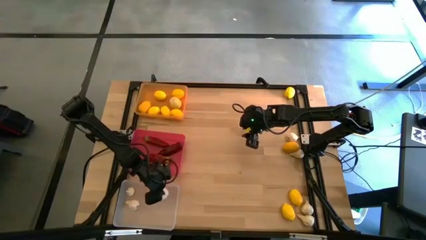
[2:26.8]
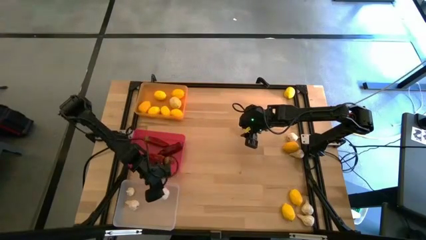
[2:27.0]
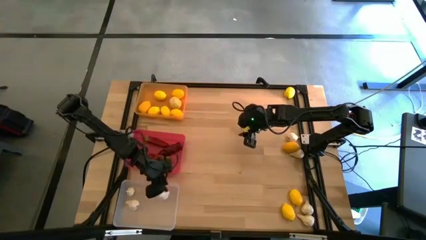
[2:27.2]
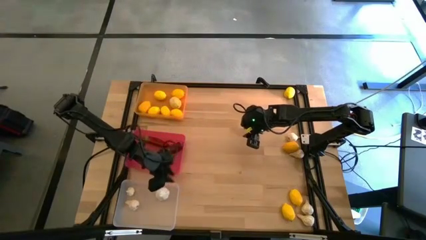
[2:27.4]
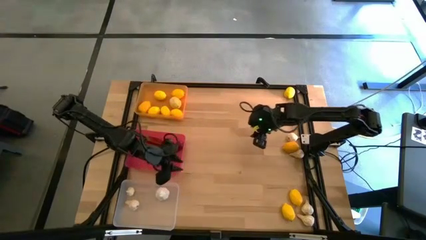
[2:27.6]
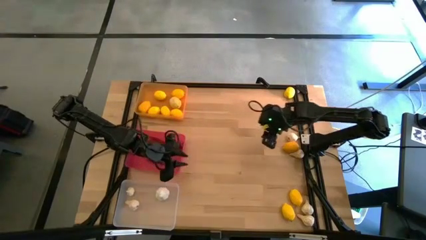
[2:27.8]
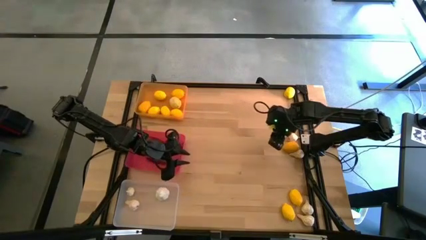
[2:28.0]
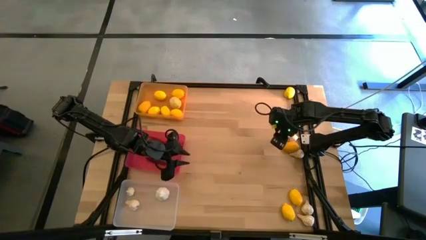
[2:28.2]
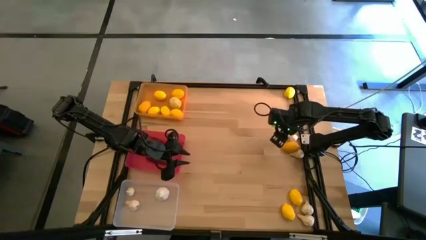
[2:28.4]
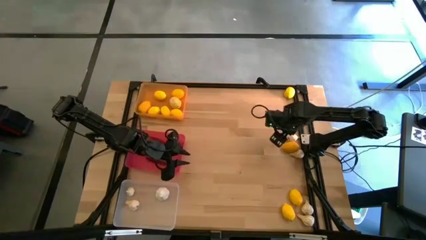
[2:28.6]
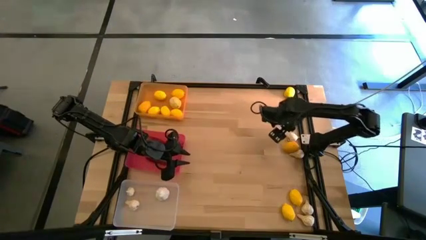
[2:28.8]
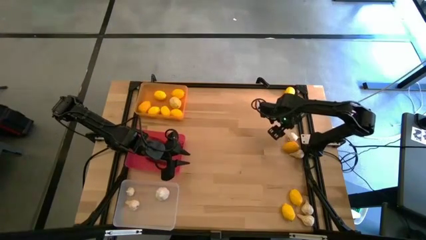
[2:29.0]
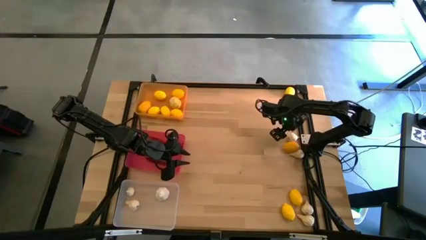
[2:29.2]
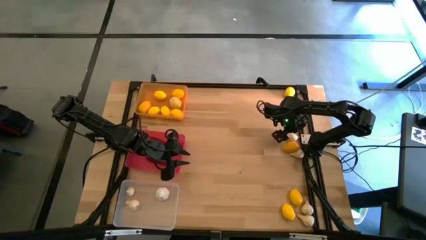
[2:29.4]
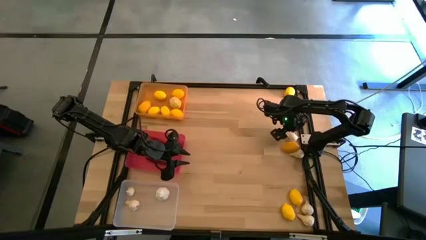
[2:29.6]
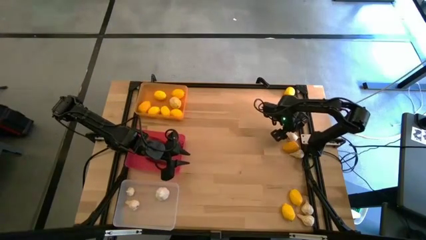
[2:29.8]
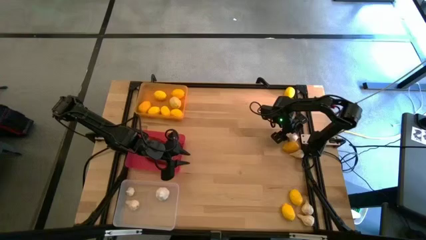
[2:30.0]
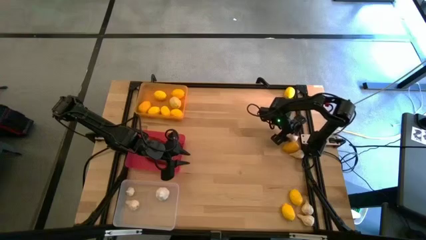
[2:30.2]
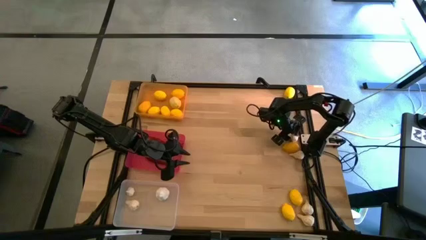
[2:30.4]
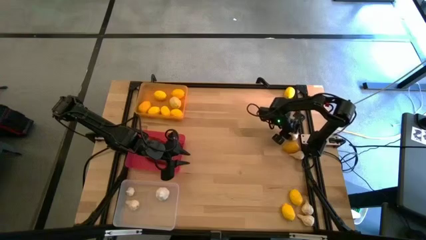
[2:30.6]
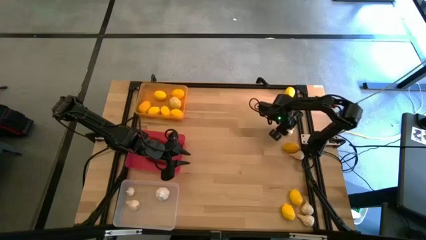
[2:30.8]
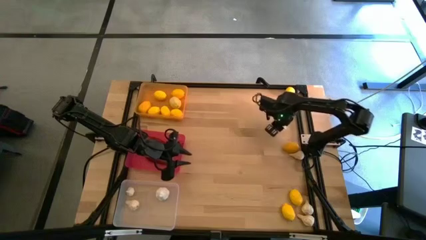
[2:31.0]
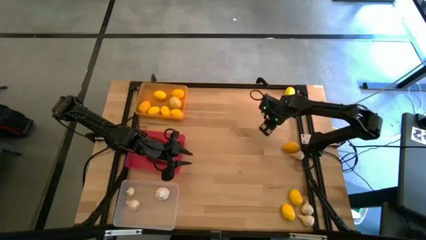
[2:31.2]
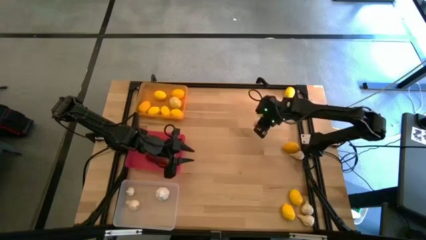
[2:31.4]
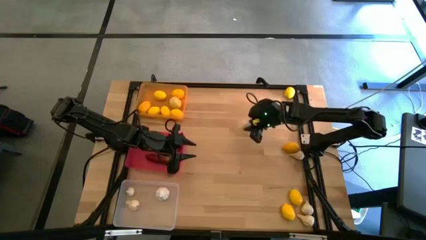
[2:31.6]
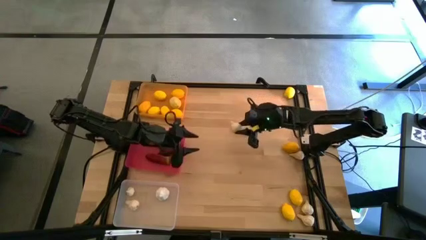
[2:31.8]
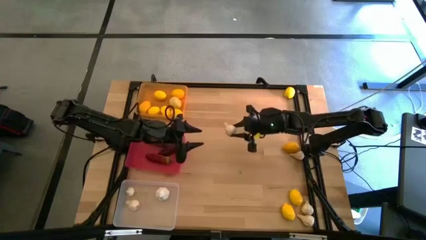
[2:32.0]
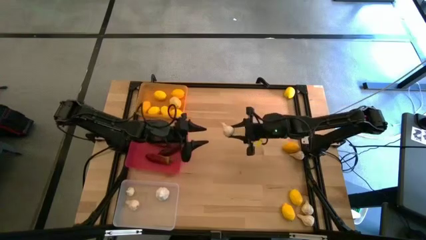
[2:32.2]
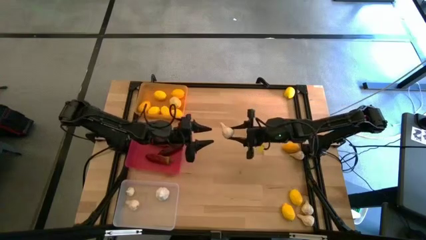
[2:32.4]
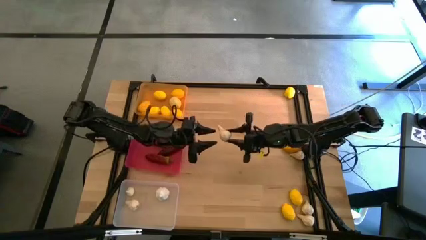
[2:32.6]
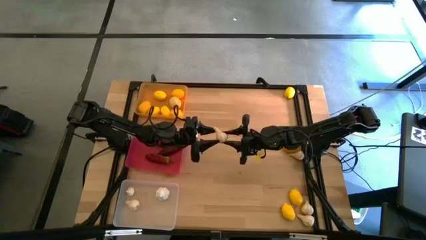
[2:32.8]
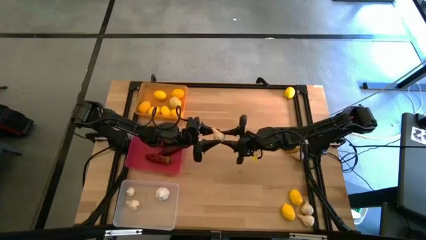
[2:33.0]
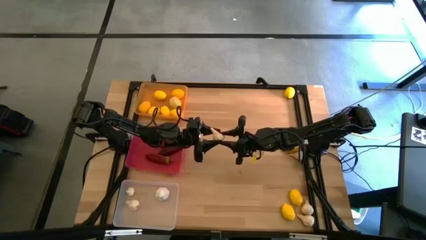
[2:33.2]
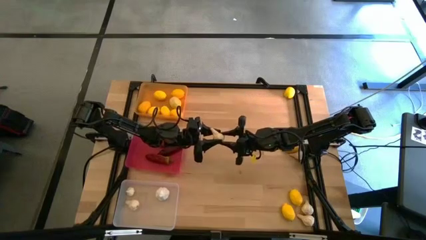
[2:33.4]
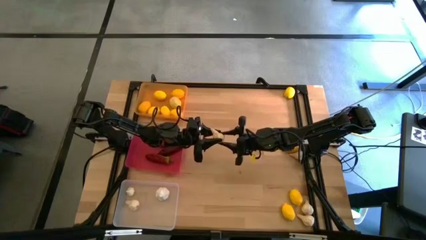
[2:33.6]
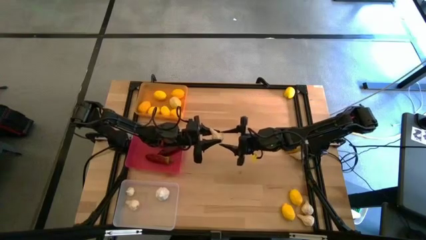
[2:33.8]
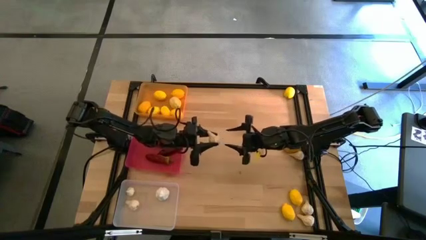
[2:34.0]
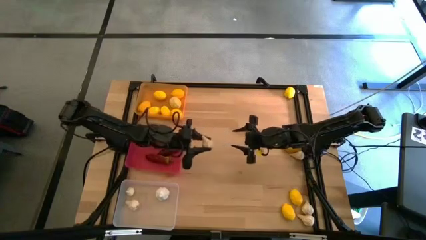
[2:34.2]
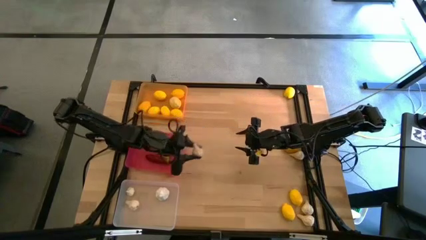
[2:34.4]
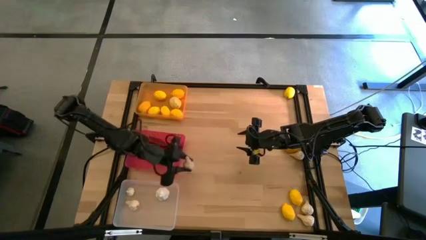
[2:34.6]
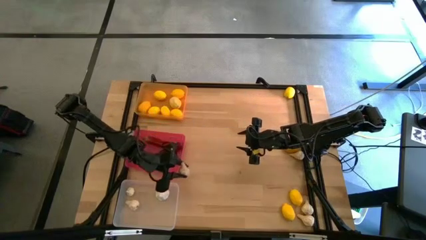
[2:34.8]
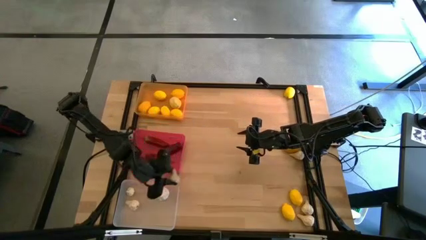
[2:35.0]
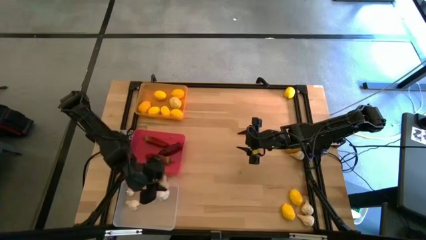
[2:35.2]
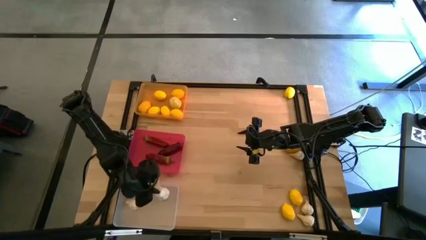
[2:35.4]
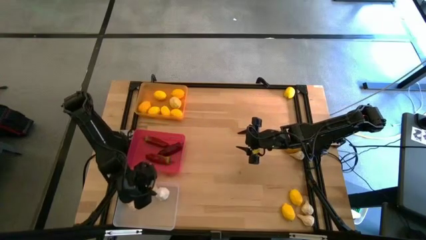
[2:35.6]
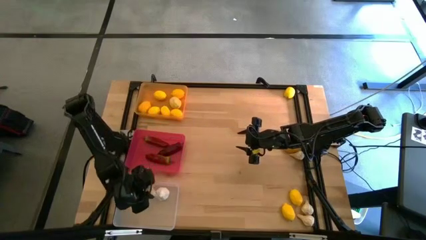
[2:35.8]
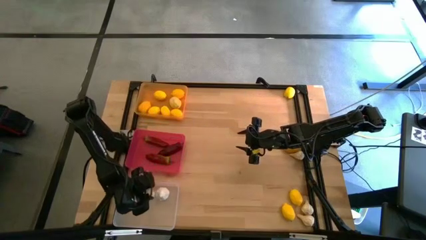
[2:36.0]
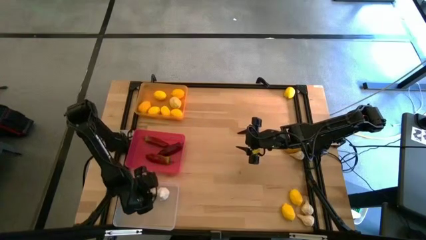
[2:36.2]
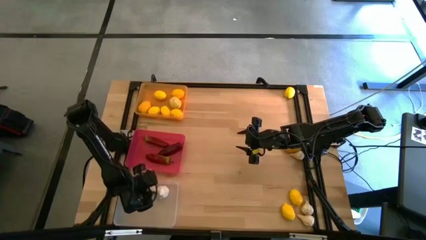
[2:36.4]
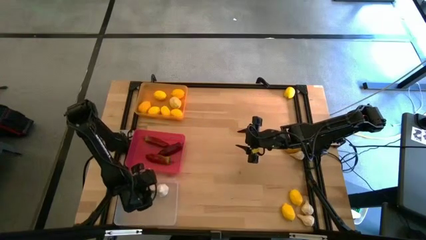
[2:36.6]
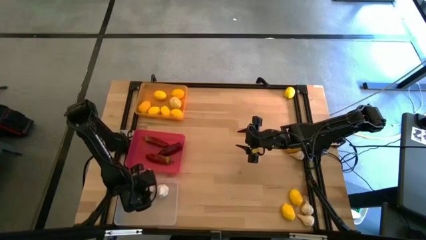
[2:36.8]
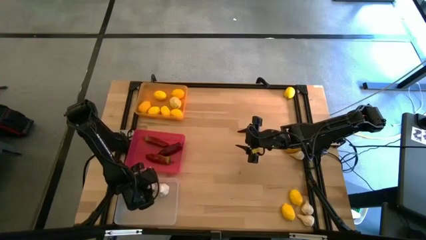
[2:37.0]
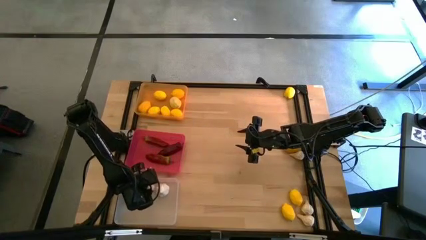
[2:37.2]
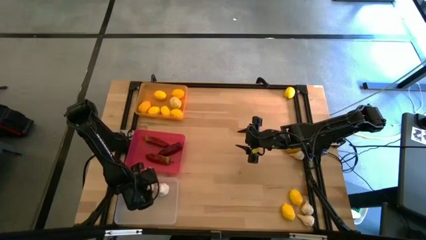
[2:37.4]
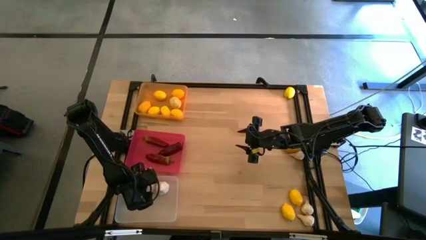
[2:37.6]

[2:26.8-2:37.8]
Task: Sort produce into baskets
Put the garlic into the transparent bin

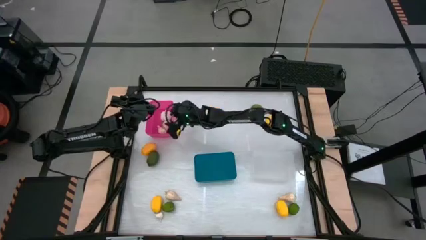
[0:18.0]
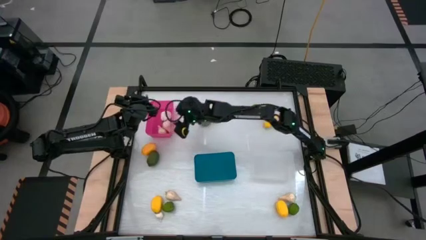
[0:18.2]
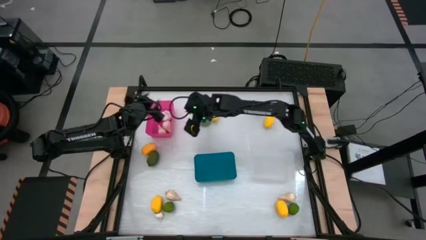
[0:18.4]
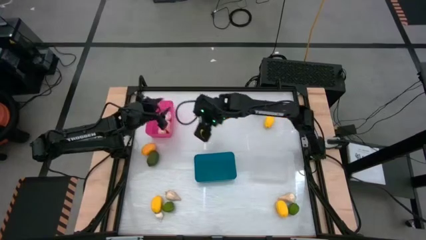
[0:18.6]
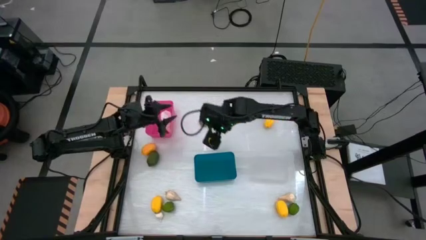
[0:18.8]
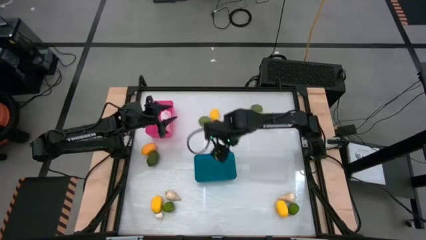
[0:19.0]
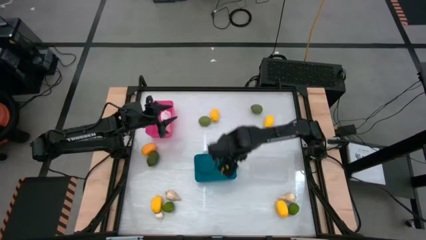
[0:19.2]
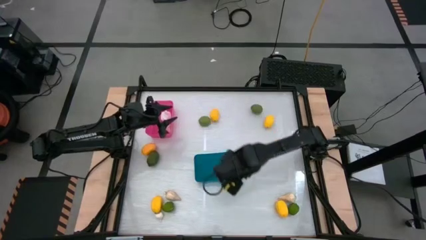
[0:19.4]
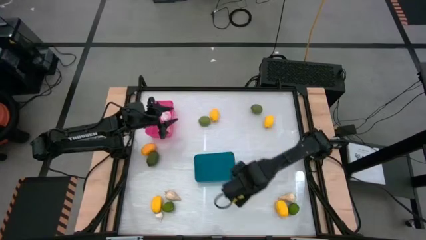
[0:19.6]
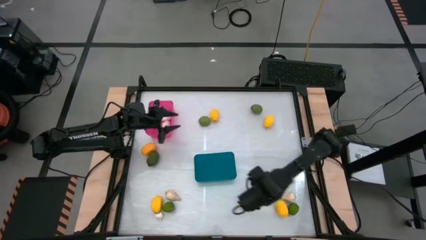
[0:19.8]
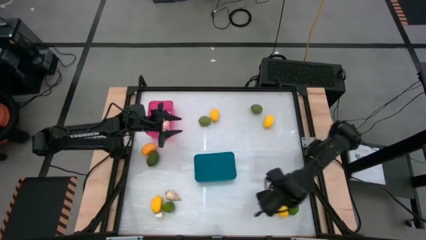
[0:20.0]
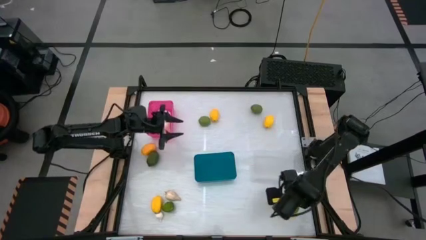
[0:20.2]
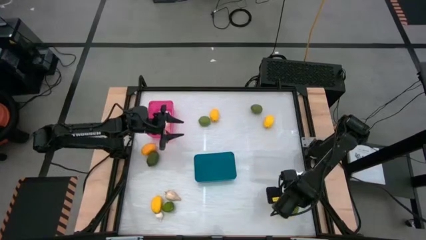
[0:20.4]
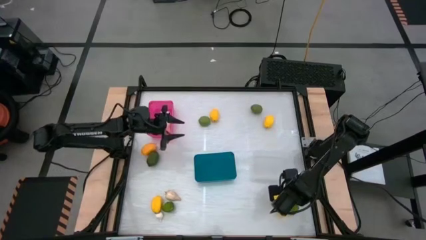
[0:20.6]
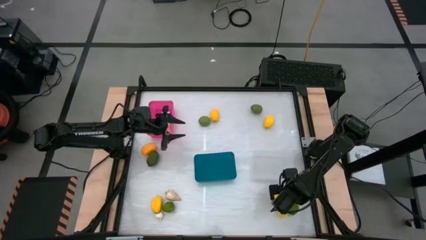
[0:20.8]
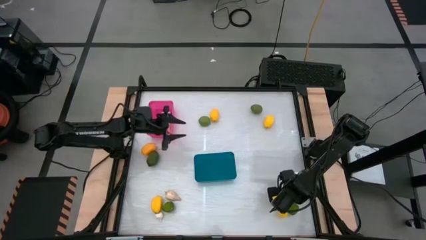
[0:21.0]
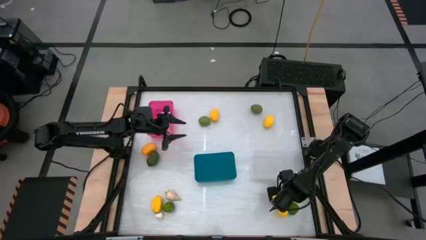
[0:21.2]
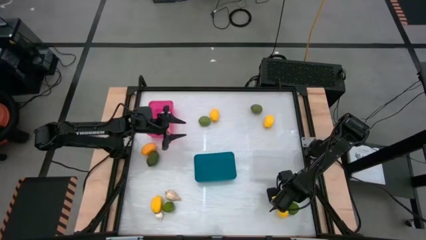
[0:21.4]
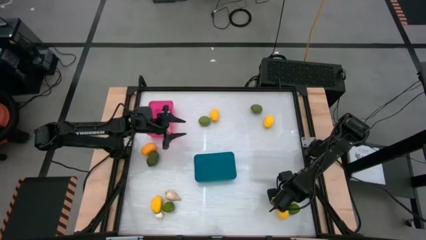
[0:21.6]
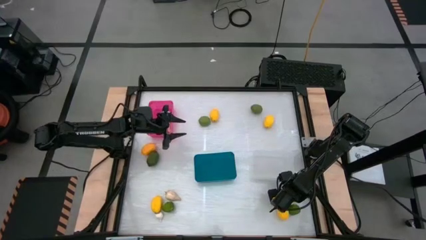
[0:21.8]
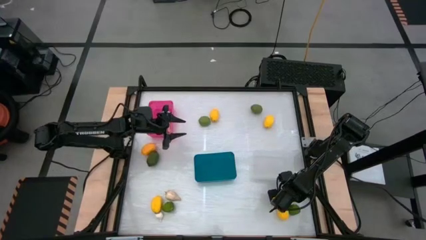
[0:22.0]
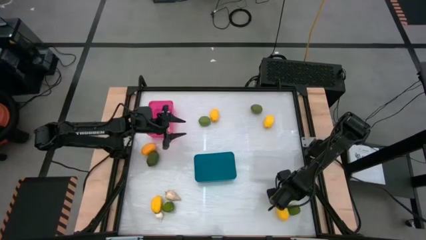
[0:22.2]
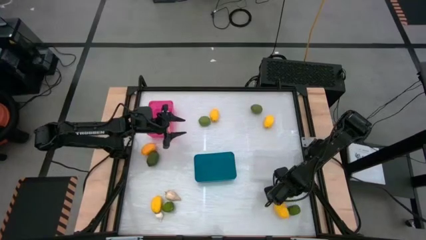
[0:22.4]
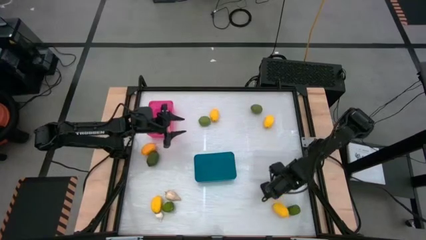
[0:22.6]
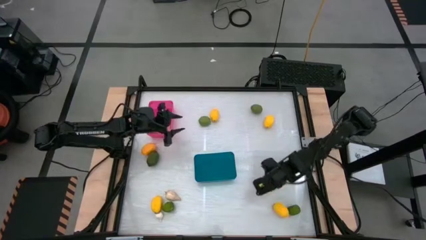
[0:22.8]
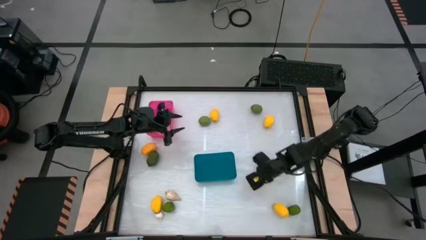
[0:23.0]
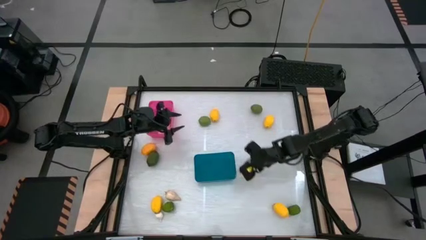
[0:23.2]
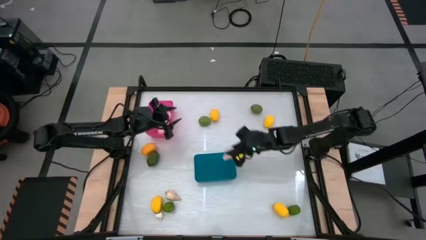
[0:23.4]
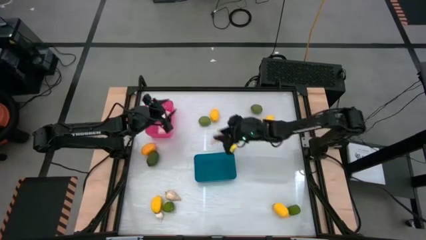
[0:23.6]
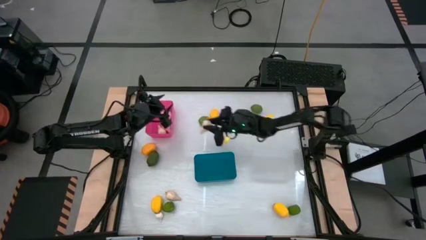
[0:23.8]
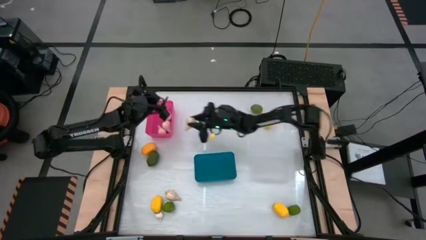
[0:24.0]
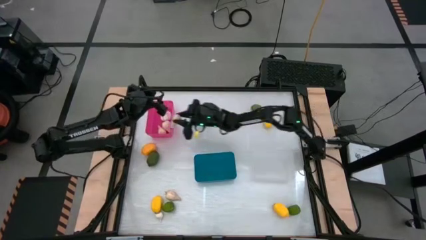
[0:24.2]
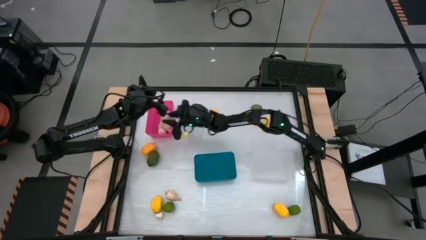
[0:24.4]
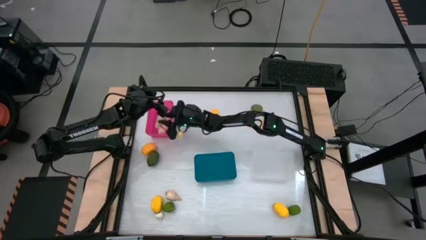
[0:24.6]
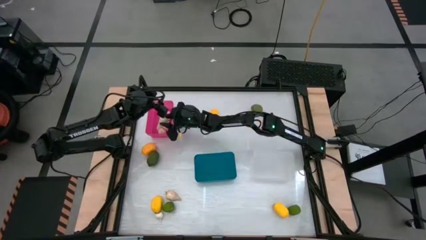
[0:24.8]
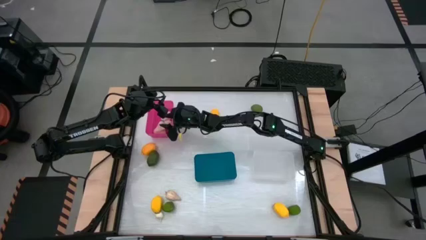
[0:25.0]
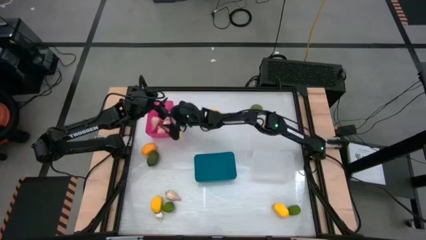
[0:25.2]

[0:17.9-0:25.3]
Task: Sort produce into baskets
Put the garlic into the pink bin
